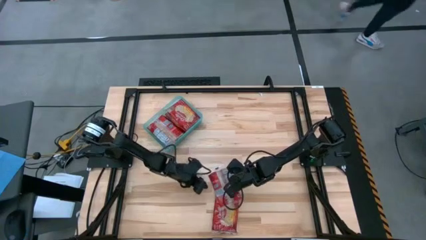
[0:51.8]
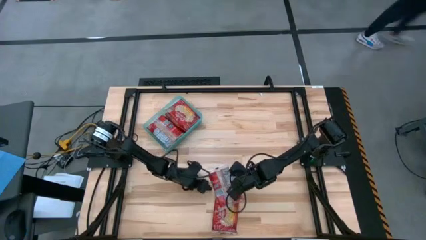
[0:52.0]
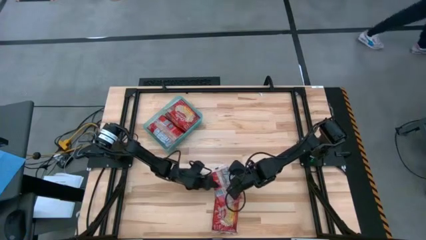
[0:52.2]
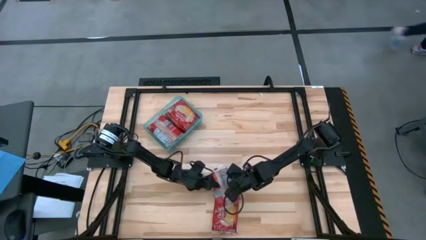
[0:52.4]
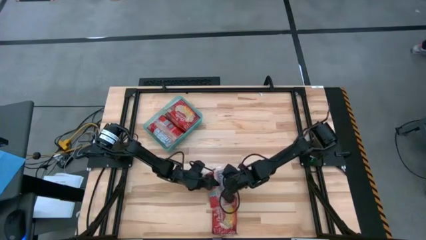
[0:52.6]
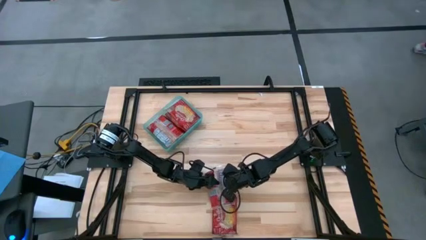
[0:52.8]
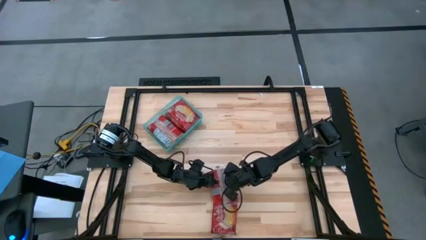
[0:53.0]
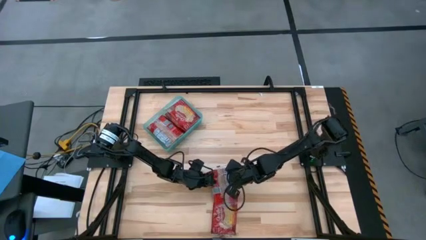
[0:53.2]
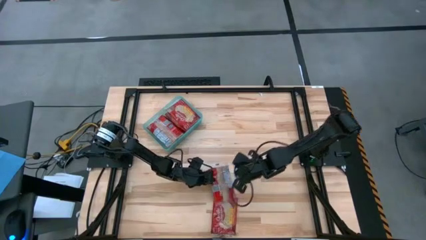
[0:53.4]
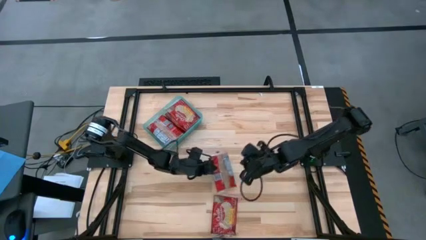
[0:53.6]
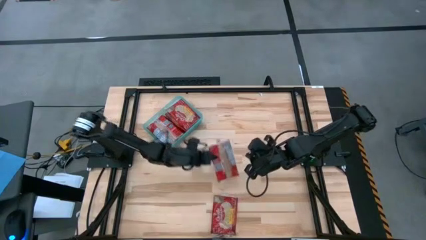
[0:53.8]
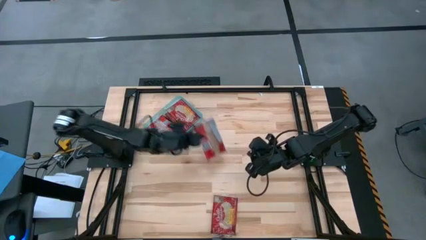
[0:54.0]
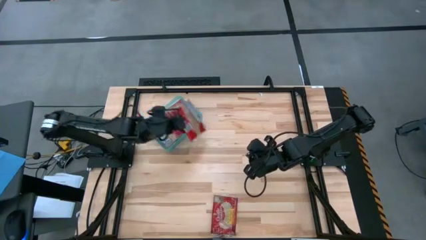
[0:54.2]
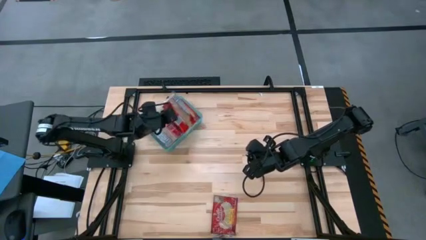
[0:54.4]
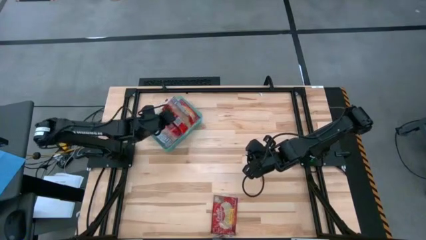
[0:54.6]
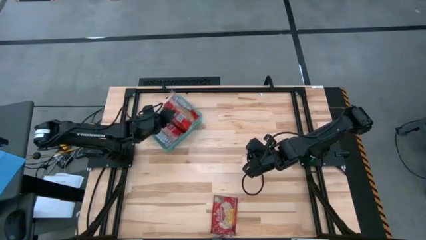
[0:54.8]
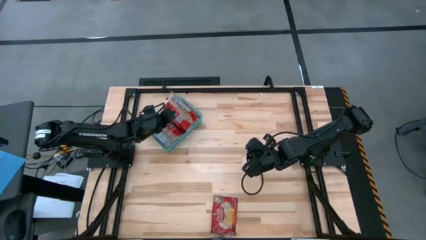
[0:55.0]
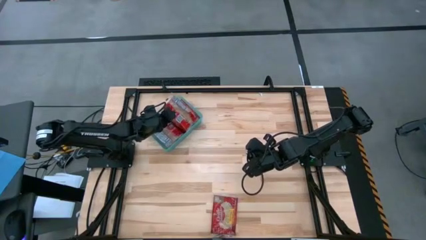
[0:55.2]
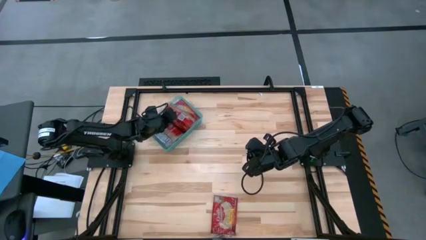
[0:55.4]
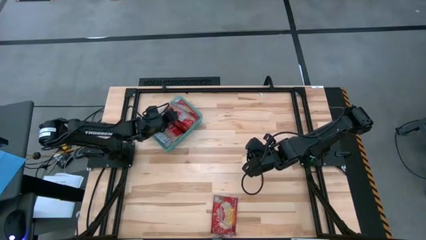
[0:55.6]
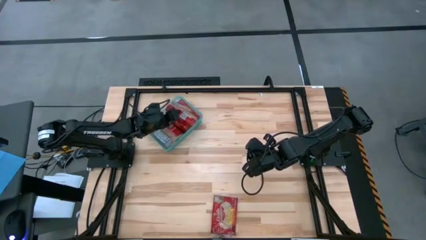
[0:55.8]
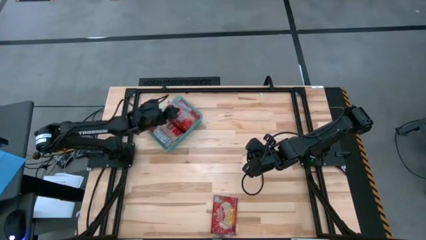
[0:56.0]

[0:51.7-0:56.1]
Task: Sort popcorn bags into baskets
Put the red popcorn bag into the blue bin

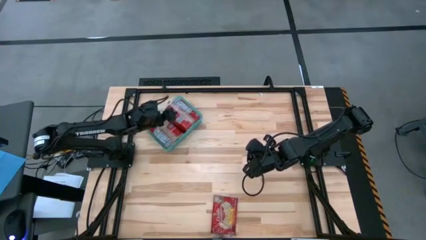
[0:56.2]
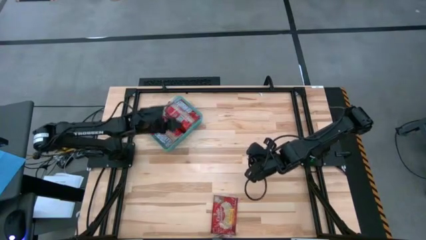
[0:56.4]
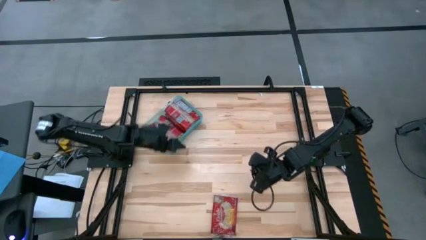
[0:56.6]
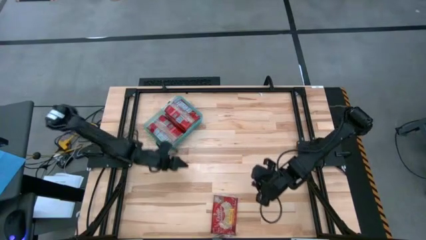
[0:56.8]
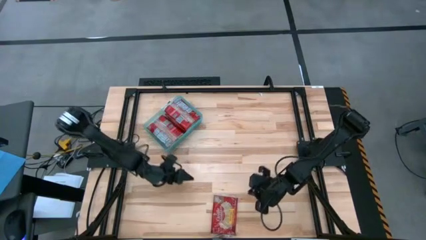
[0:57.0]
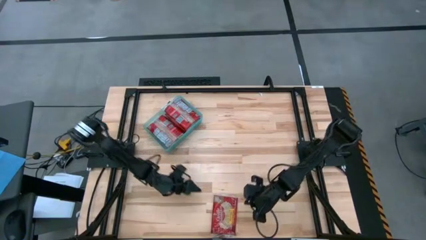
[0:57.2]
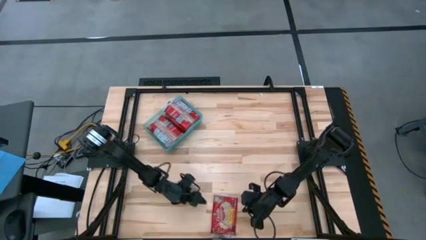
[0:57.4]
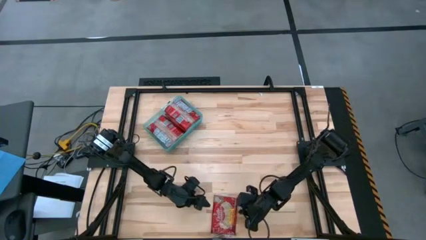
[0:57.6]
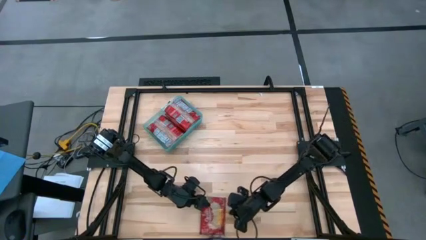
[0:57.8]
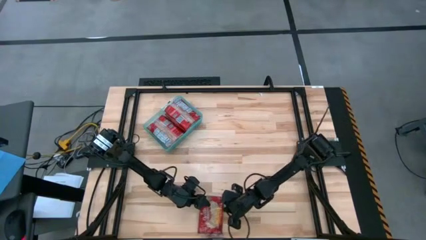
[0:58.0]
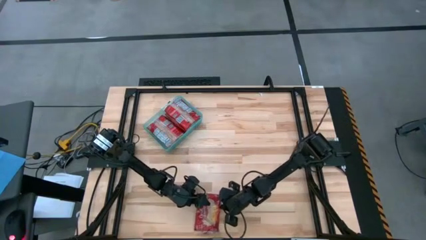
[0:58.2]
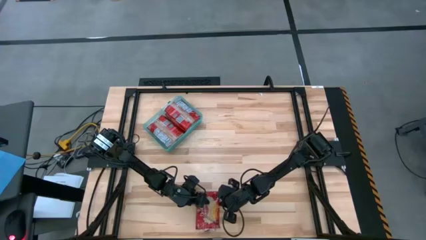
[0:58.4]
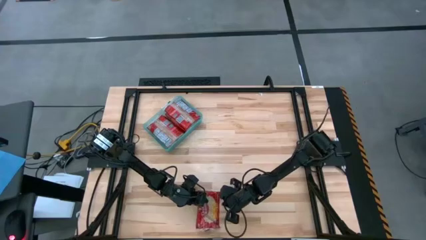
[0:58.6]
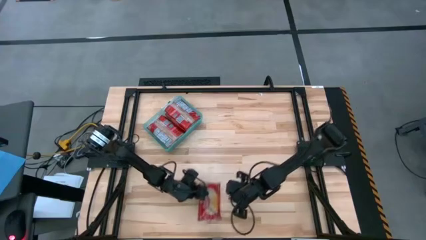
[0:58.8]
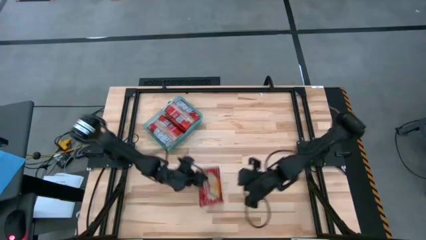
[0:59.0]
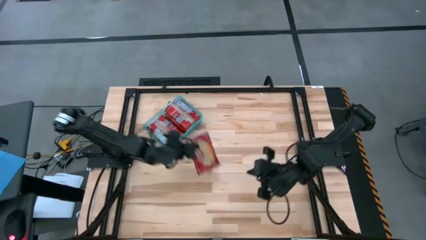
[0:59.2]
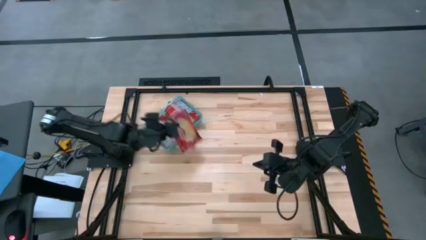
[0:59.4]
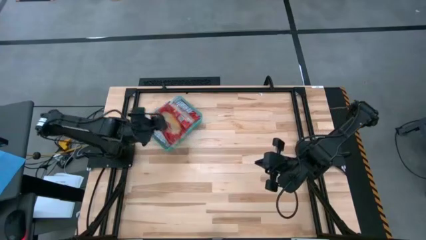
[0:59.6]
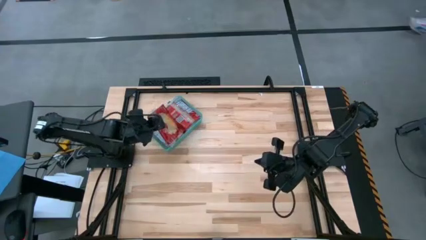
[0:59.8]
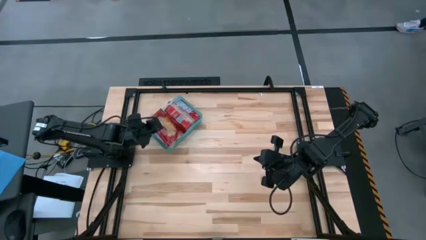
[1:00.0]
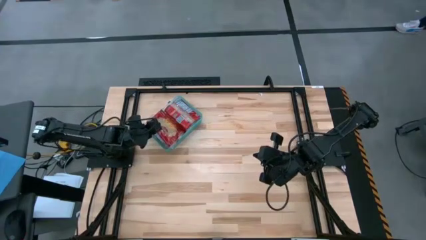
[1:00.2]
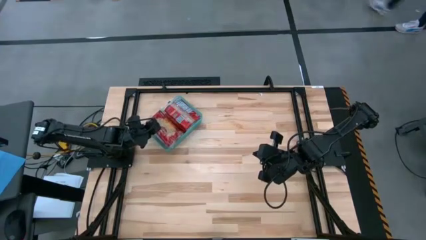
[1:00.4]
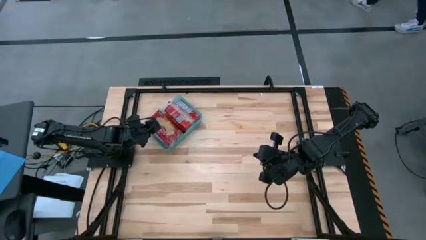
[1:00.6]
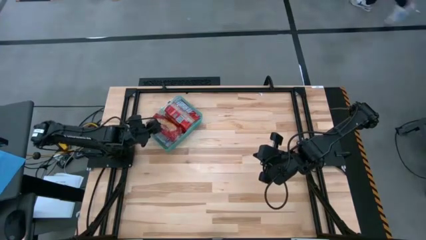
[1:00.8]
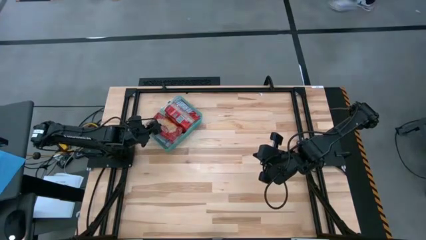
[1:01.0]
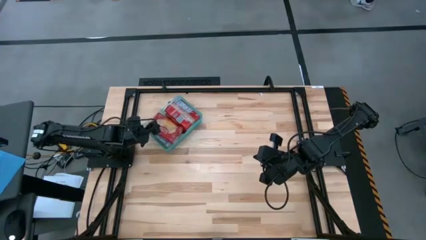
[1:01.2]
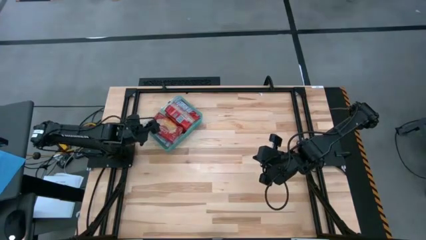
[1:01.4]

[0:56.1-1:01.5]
Put the red popcorn bag into the blue bin

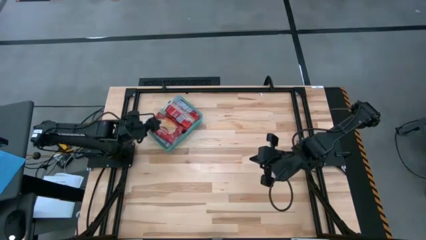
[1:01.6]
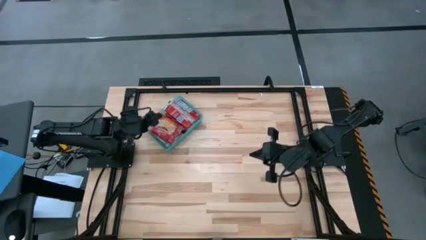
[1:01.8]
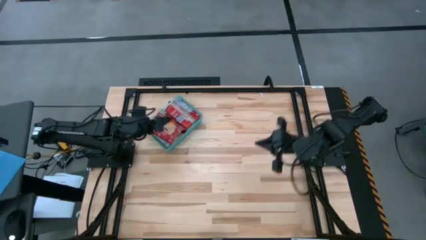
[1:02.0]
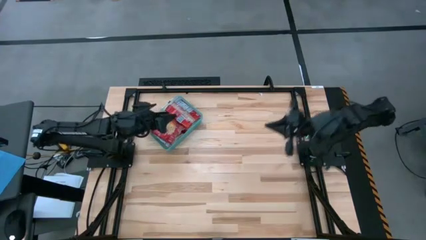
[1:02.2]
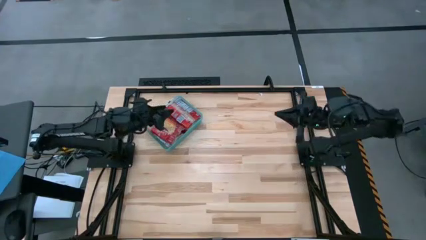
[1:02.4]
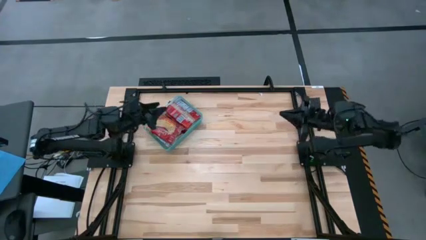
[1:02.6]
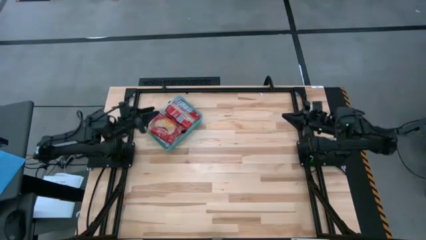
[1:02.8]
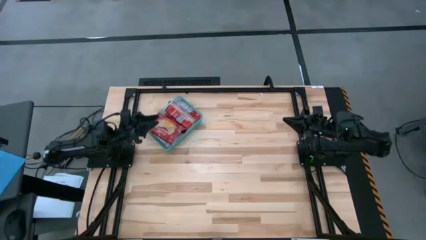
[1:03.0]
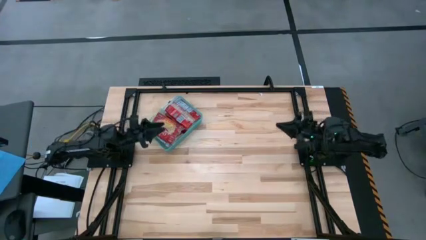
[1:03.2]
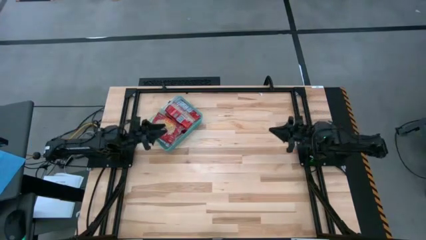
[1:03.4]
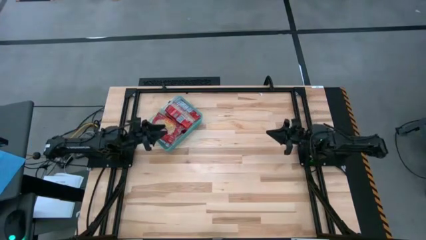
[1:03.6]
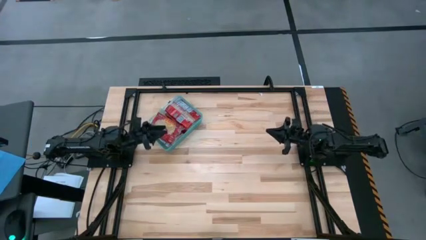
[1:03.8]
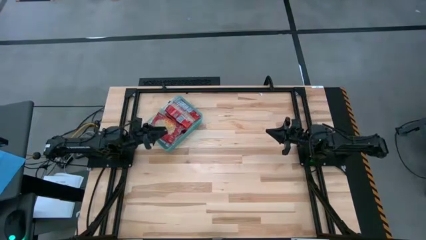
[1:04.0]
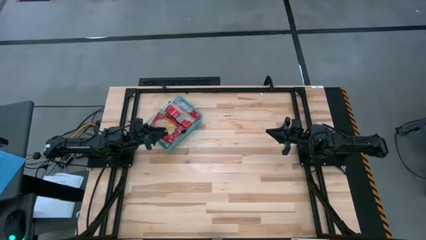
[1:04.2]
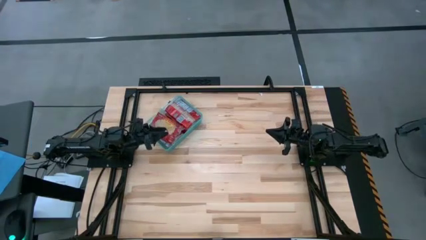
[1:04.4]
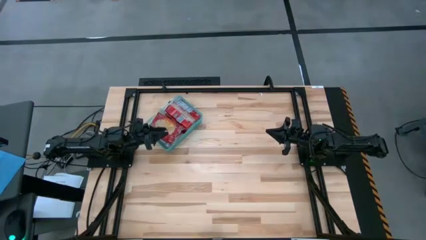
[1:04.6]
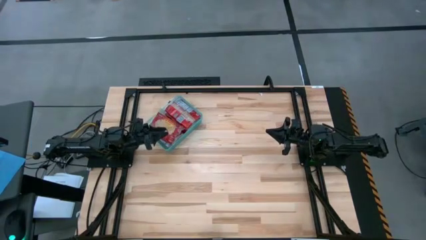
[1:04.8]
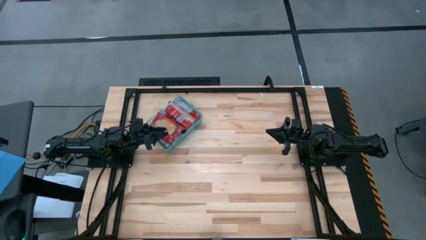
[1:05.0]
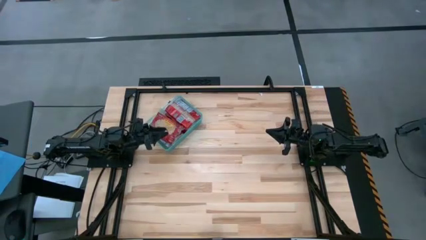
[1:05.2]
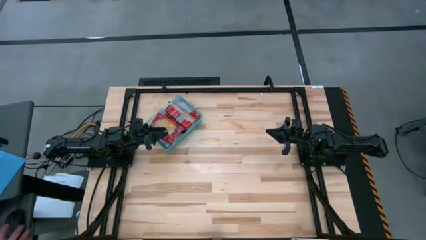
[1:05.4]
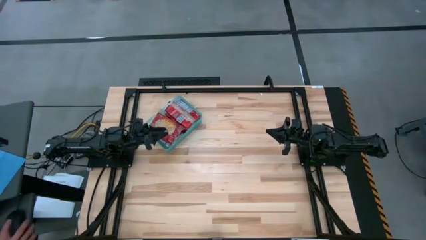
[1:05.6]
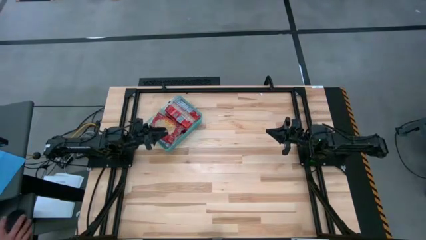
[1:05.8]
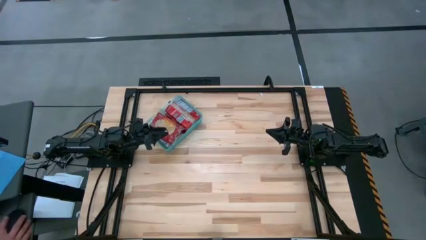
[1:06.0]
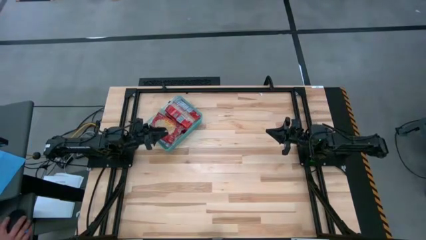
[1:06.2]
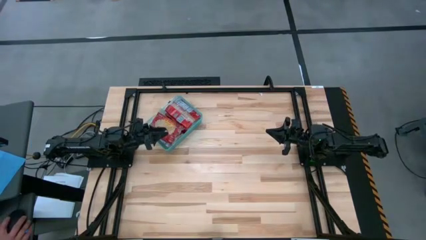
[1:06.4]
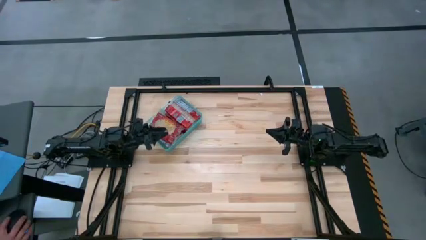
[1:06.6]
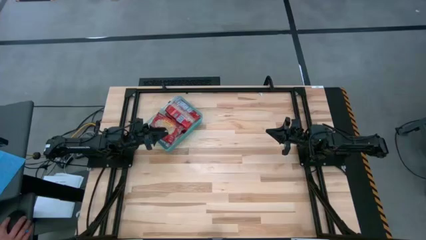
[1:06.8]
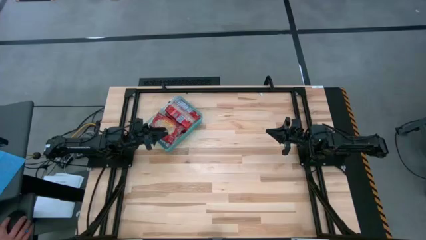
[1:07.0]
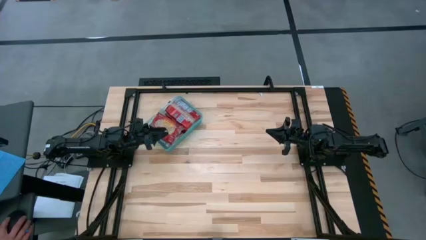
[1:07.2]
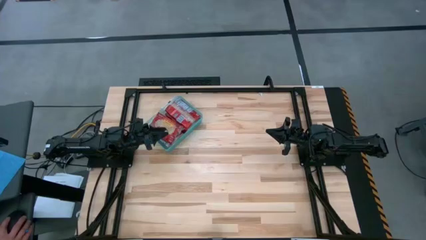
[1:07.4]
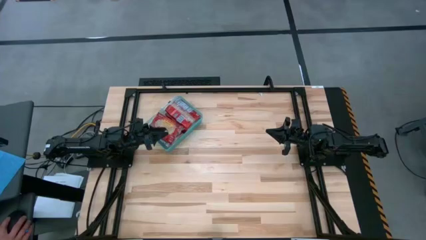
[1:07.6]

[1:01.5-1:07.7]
Return to Home Position

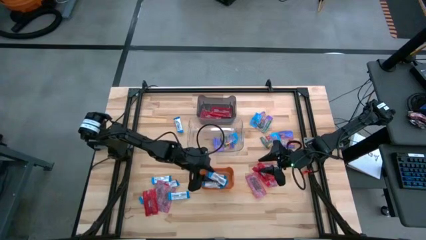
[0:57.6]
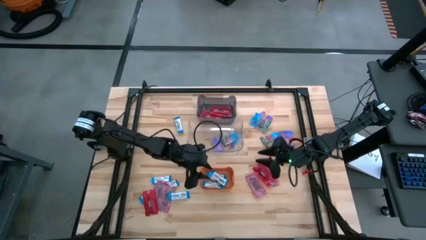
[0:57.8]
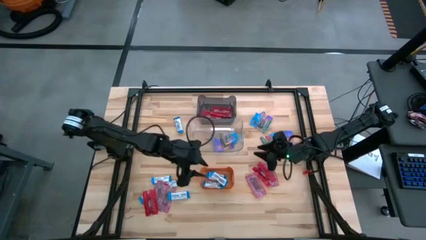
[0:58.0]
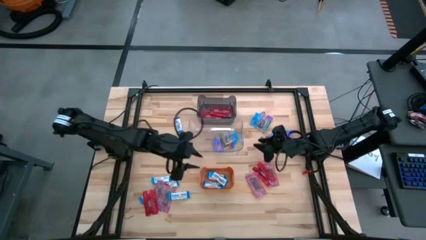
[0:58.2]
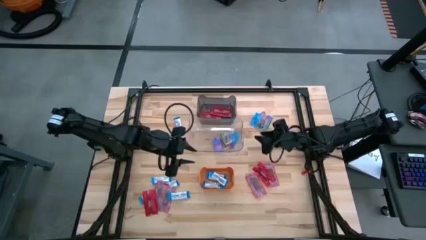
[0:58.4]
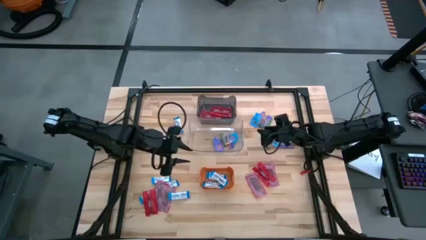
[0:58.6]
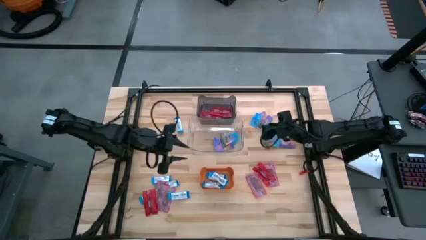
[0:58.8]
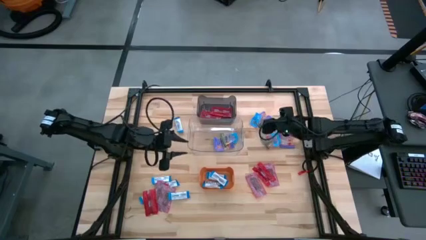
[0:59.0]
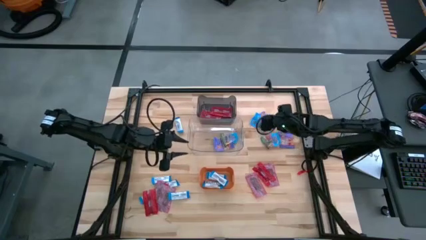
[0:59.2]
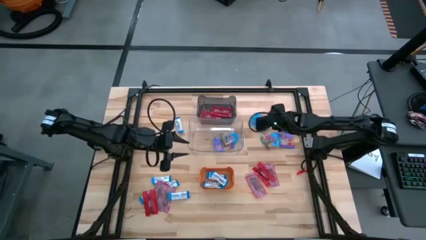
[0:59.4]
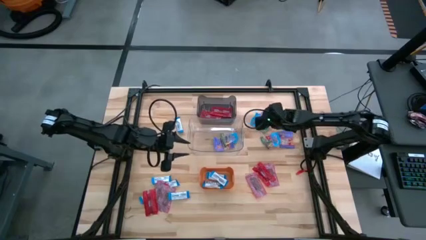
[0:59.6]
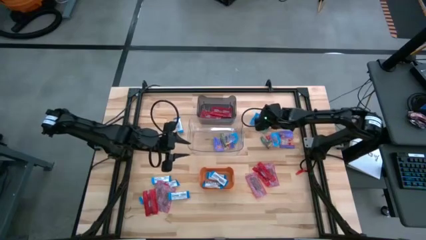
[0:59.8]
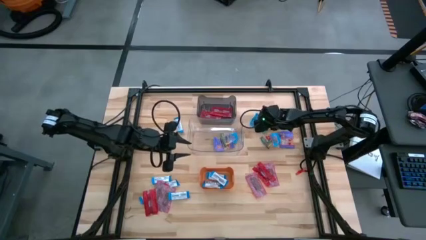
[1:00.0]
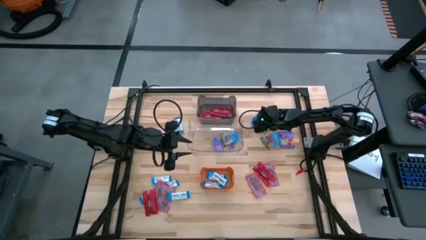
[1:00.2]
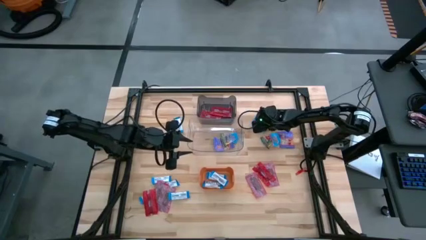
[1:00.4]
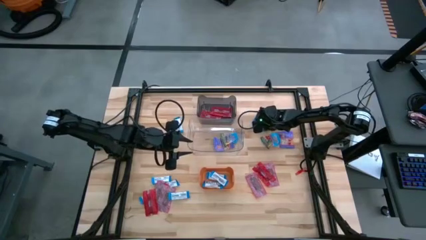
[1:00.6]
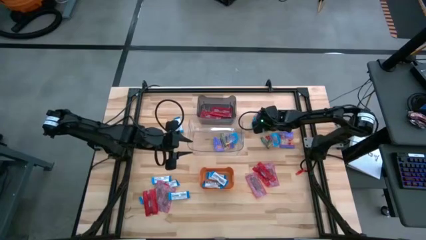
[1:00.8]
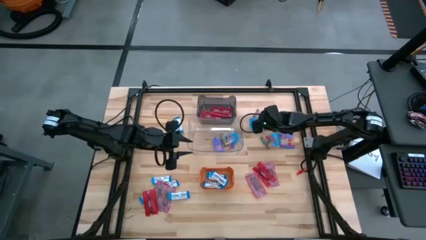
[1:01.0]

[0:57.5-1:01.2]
Task: Sort candy
Put the blue candy into the clear transparent bin
